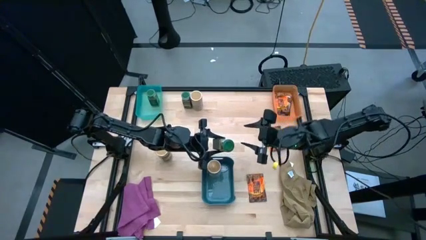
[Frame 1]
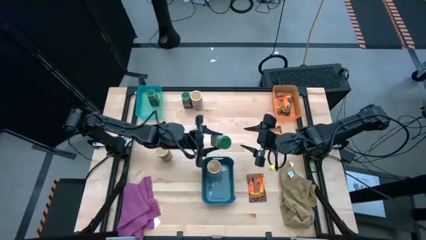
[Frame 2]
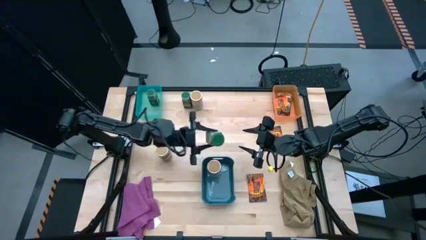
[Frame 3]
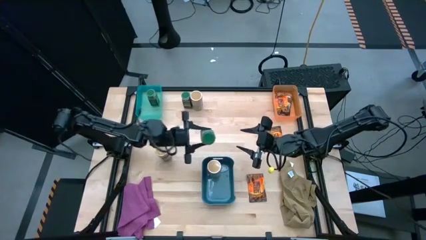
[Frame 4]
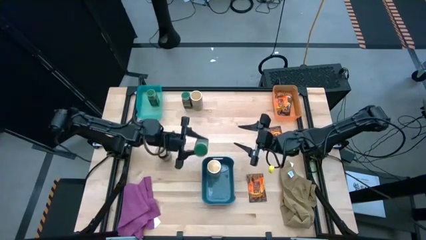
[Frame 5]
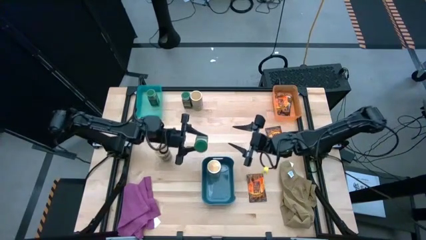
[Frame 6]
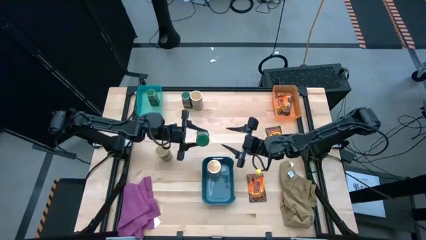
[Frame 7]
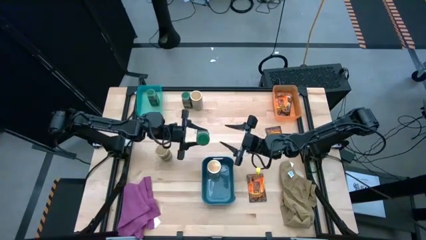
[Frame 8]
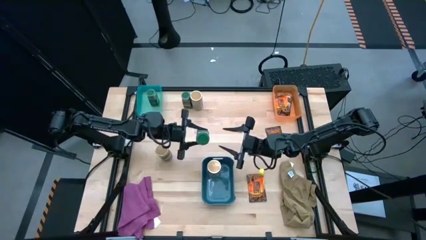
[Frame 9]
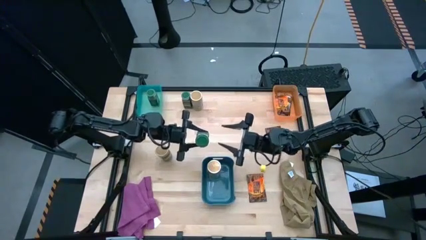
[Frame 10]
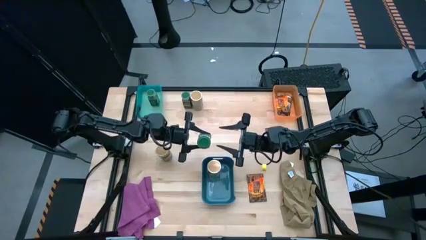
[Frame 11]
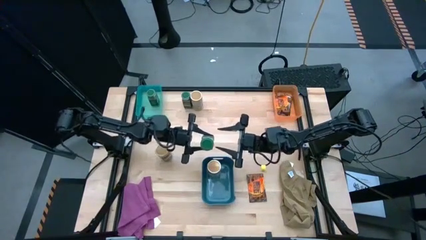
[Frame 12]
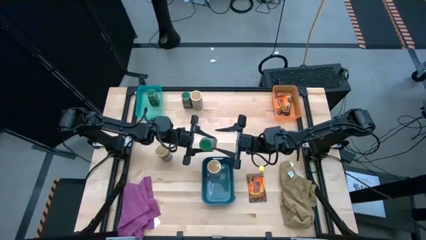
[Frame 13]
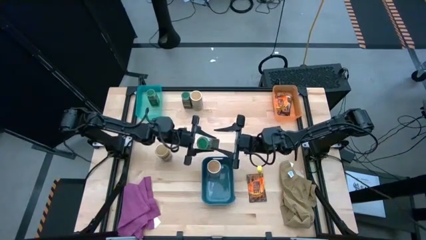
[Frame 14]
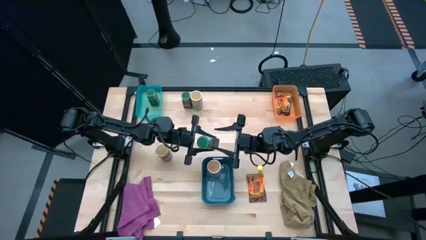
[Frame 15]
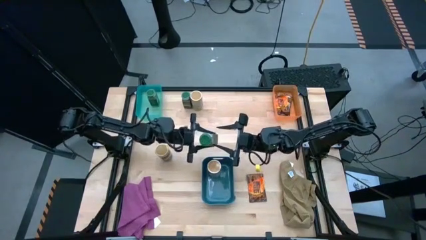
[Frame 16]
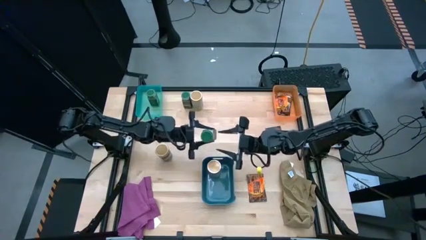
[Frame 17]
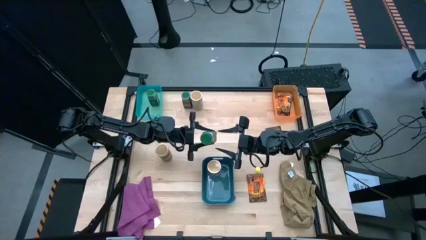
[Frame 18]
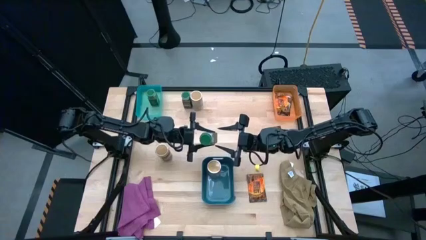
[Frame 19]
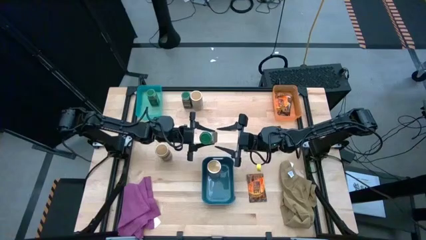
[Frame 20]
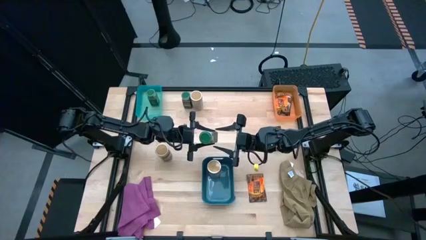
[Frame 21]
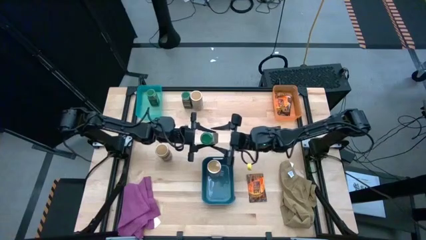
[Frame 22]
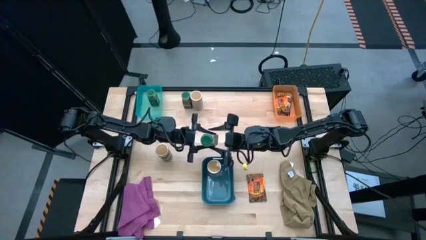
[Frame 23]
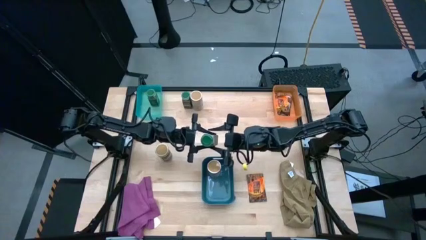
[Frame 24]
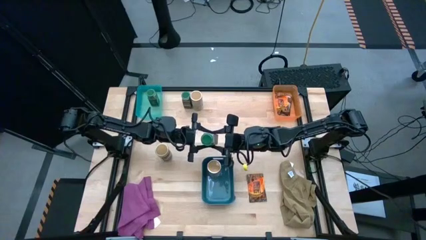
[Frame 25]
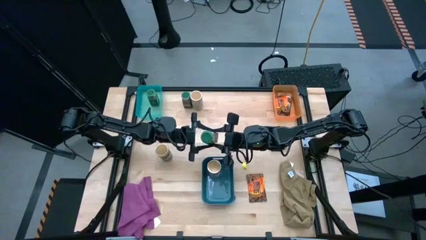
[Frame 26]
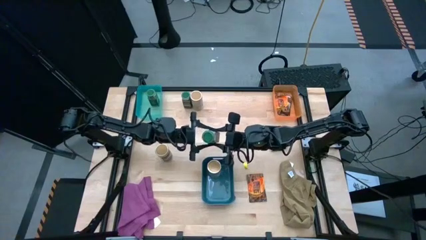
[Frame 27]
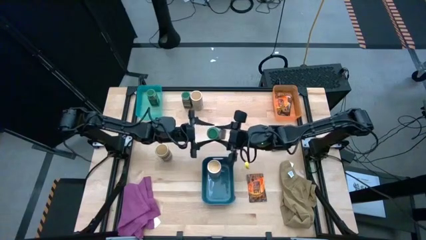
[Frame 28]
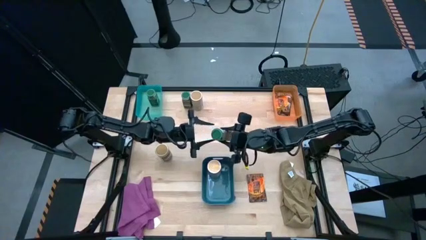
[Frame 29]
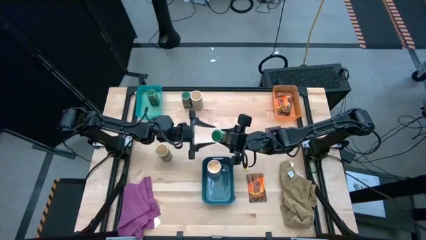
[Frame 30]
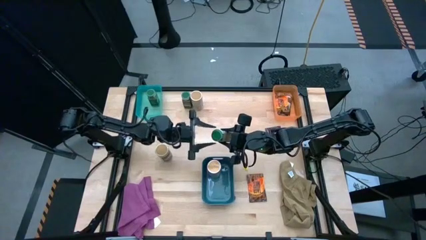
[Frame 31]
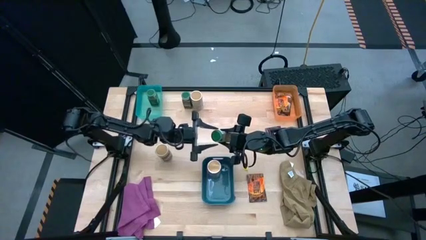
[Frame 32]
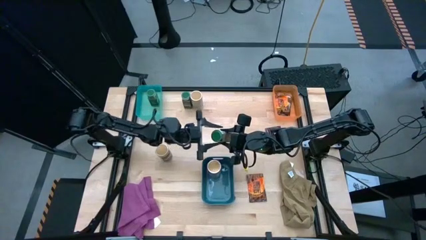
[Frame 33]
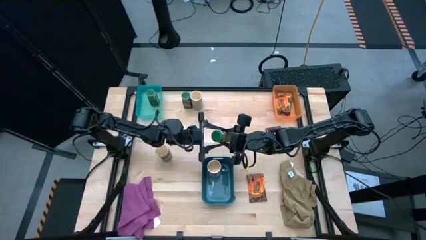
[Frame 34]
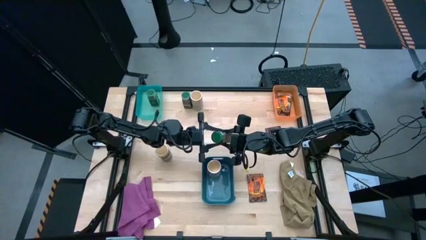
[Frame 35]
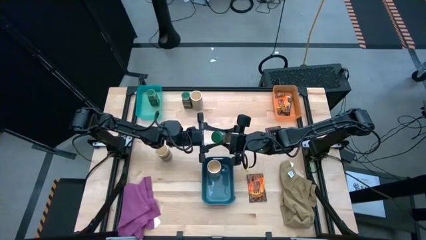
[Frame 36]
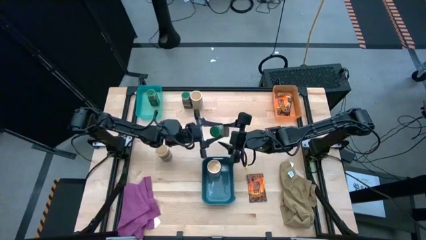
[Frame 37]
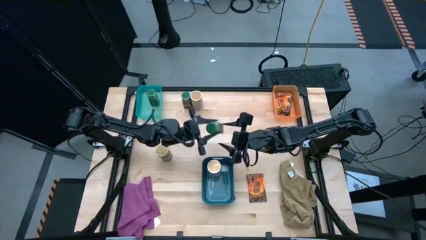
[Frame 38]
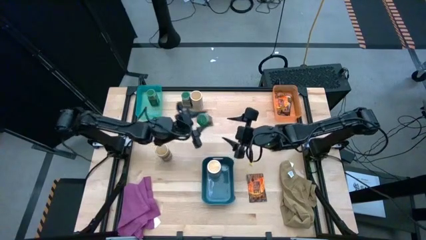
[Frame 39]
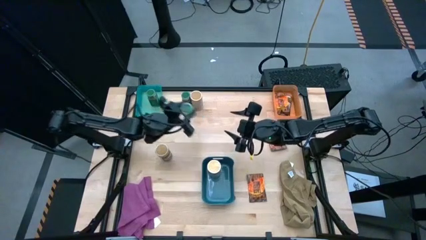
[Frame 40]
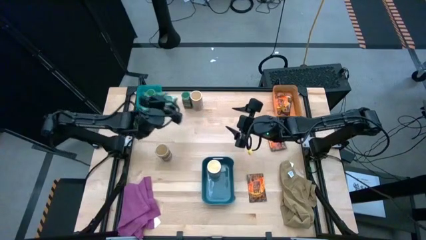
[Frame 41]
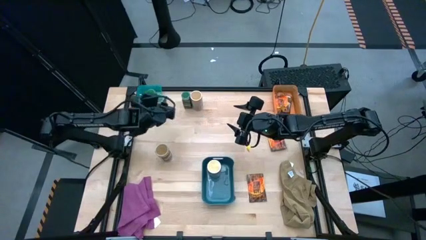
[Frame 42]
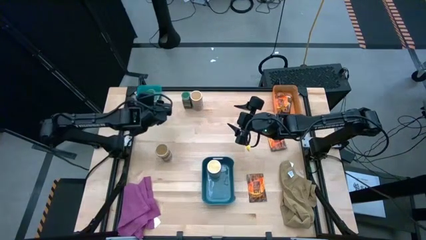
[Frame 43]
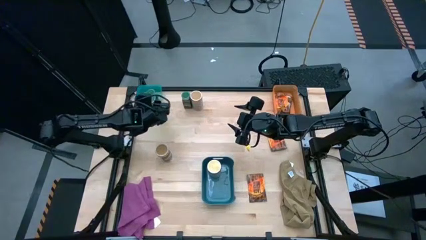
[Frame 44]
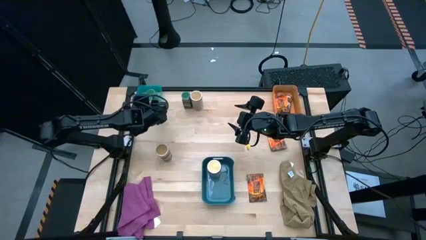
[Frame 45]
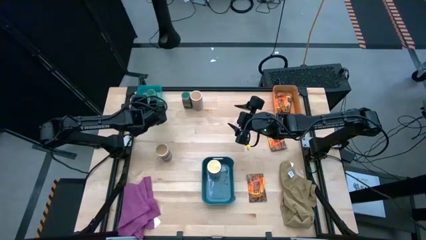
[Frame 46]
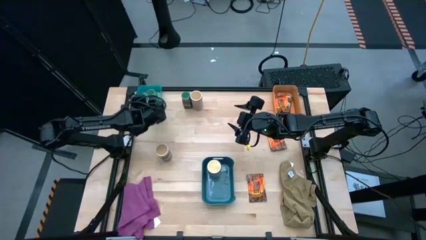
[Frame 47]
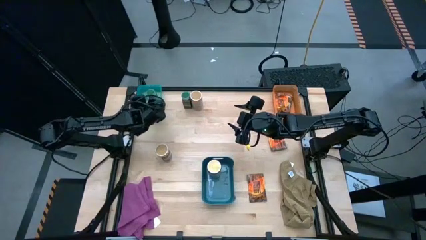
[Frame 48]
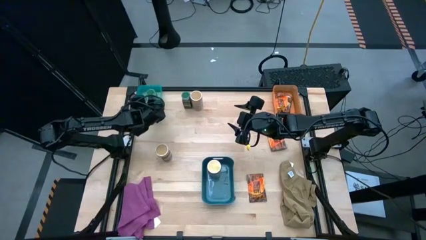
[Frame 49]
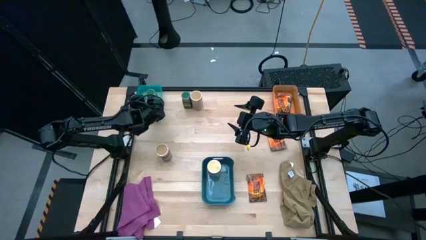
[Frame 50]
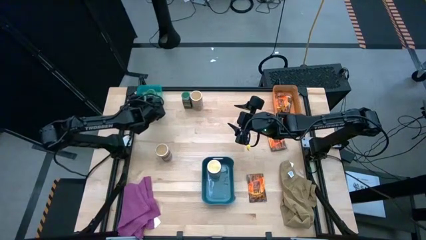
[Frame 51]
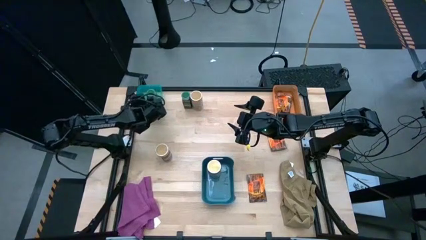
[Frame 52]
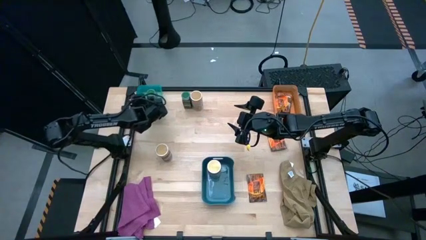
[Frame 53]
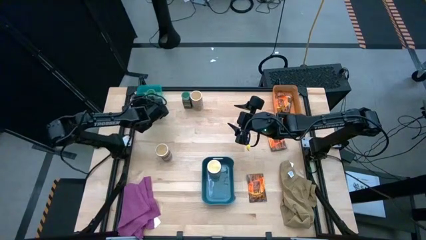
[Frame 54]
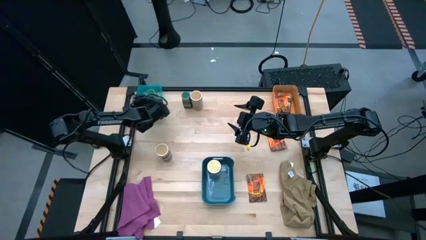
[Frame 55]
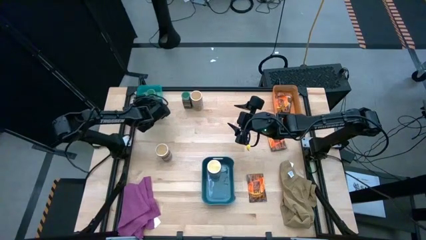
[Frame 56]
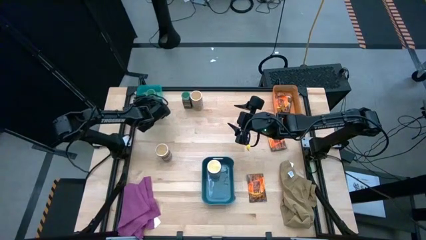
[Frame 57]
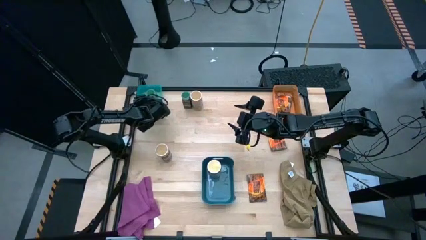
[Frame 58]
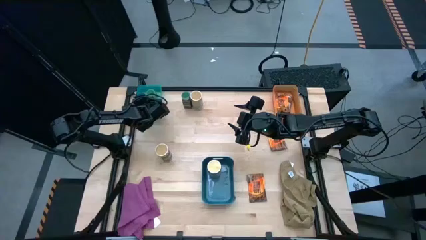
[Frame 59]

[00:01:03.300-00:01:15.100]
Task: Sort spices by type
Put the green seasoning bottle into the light blue bin
